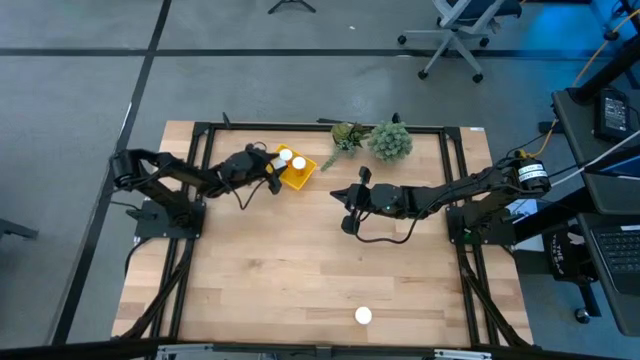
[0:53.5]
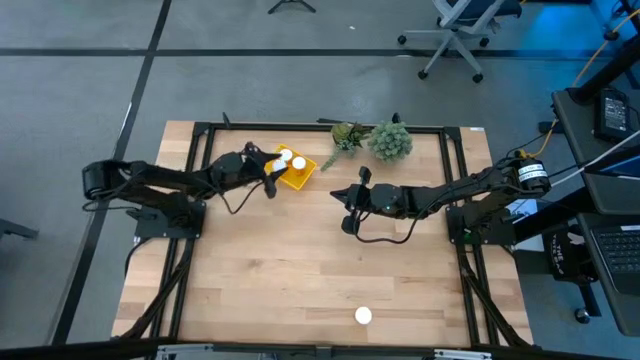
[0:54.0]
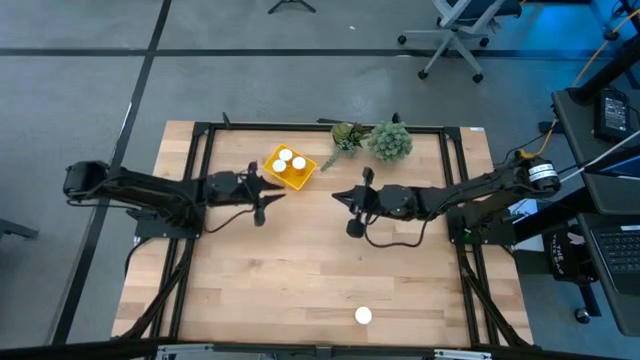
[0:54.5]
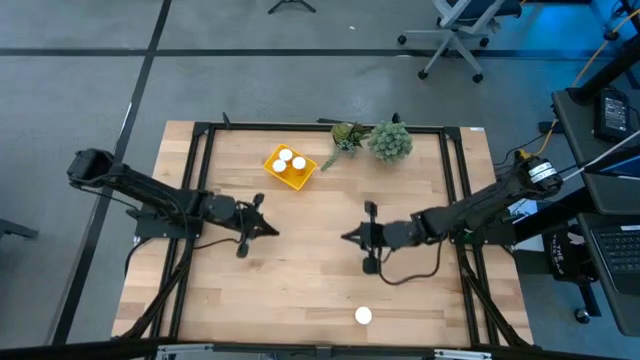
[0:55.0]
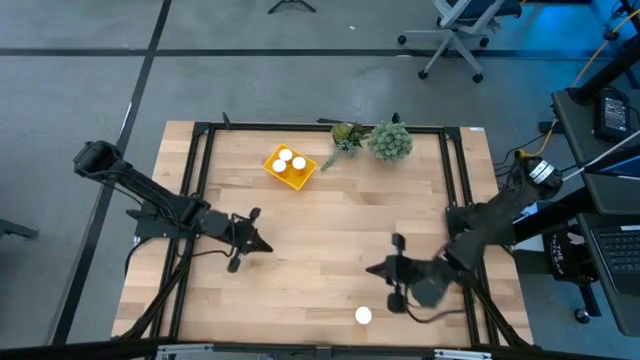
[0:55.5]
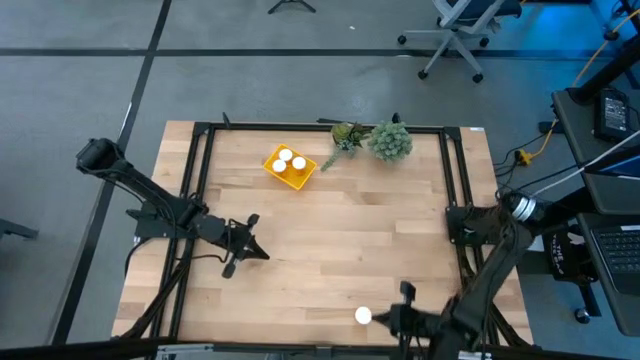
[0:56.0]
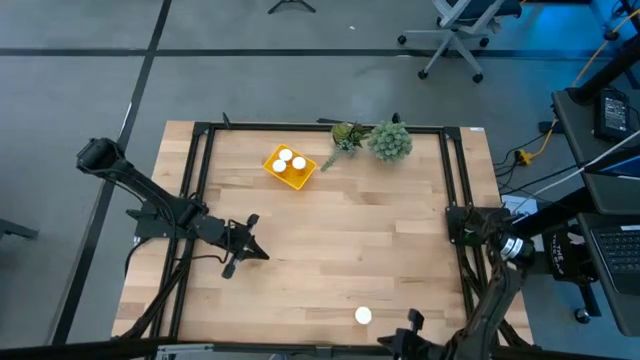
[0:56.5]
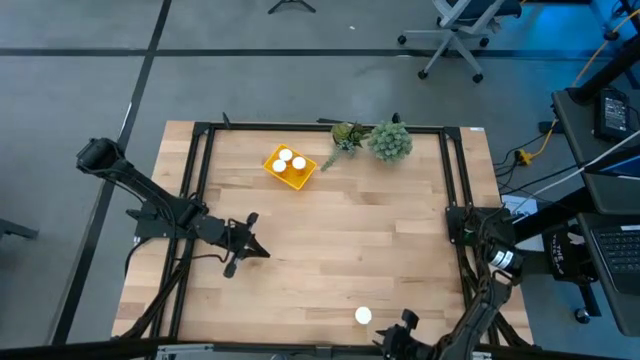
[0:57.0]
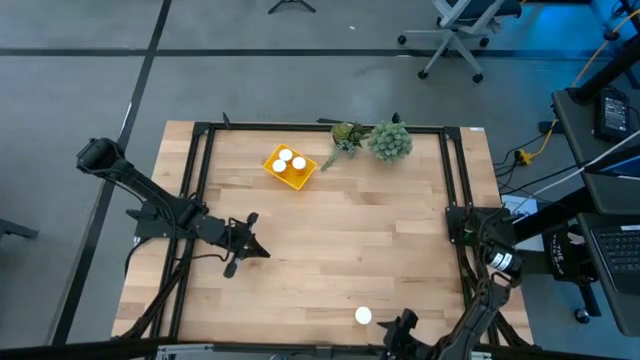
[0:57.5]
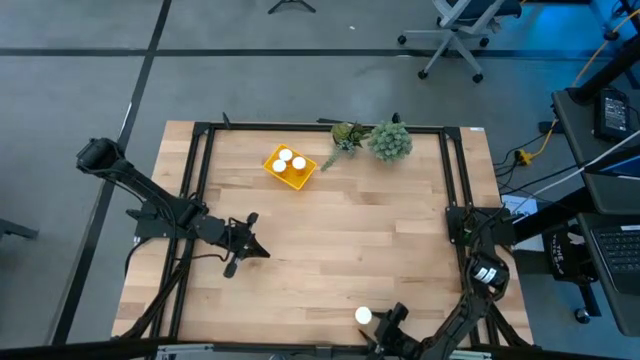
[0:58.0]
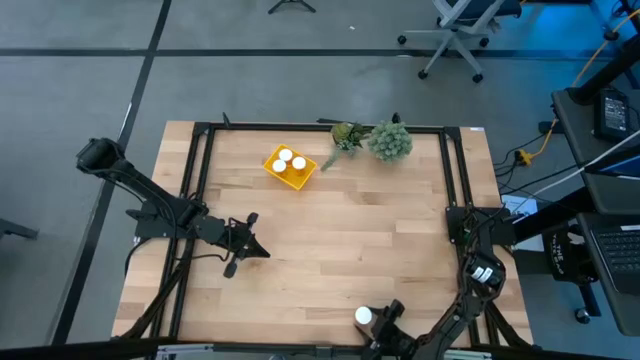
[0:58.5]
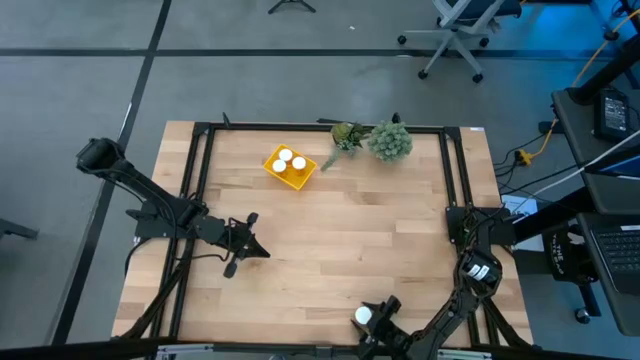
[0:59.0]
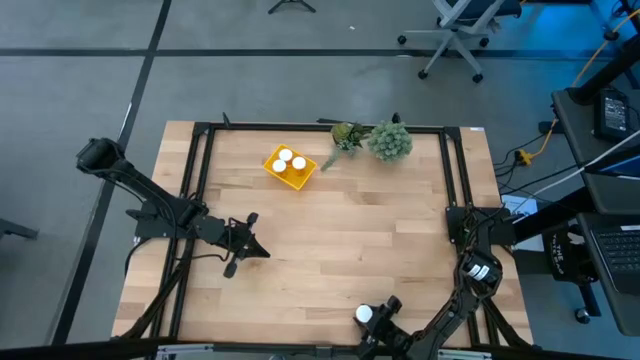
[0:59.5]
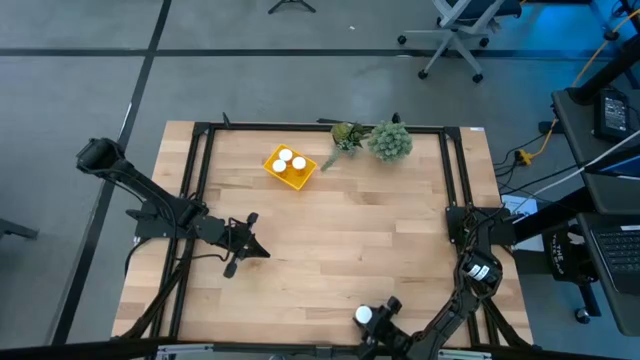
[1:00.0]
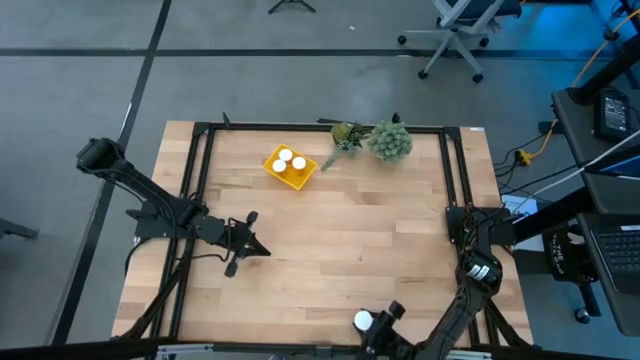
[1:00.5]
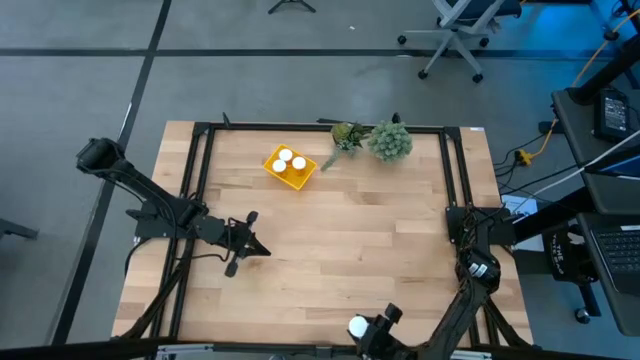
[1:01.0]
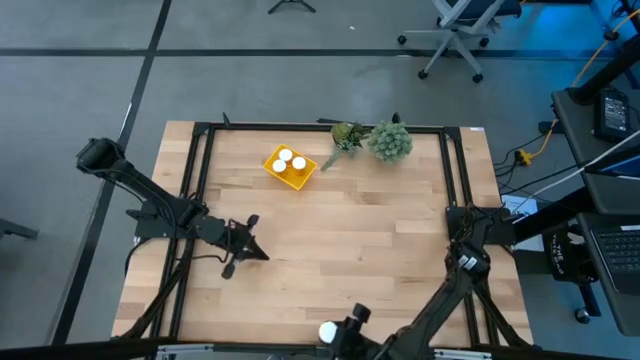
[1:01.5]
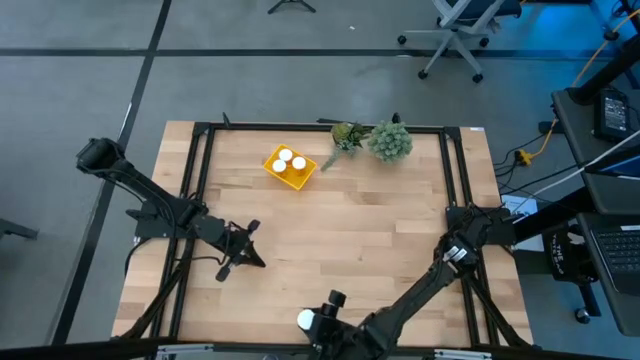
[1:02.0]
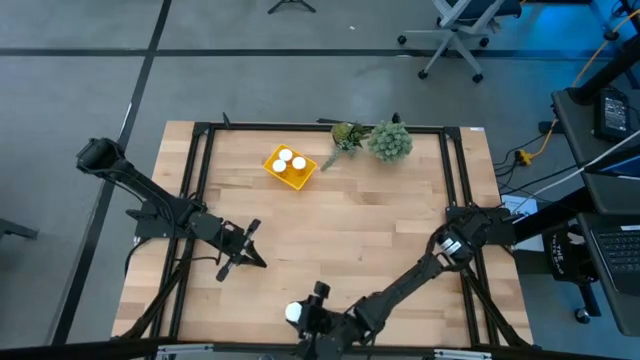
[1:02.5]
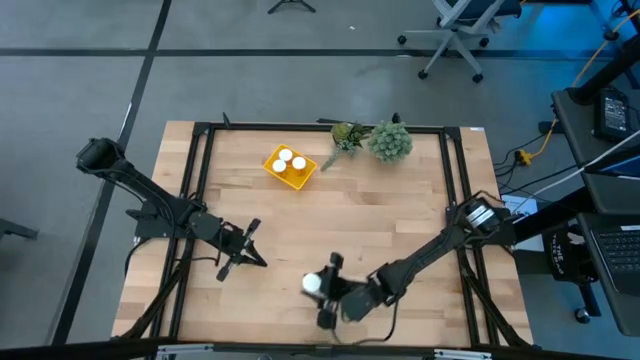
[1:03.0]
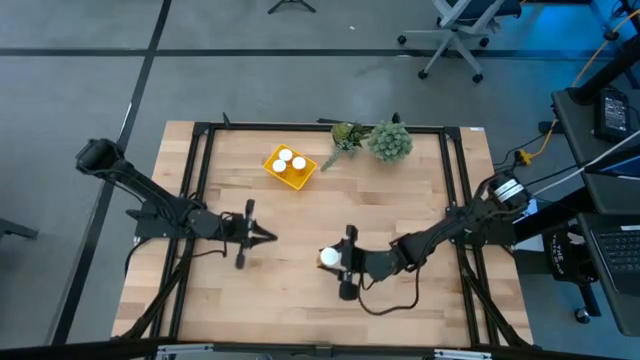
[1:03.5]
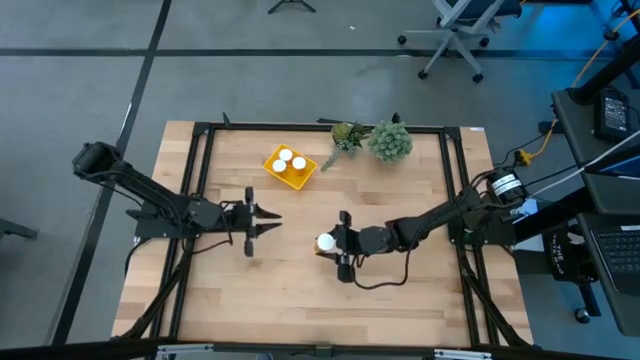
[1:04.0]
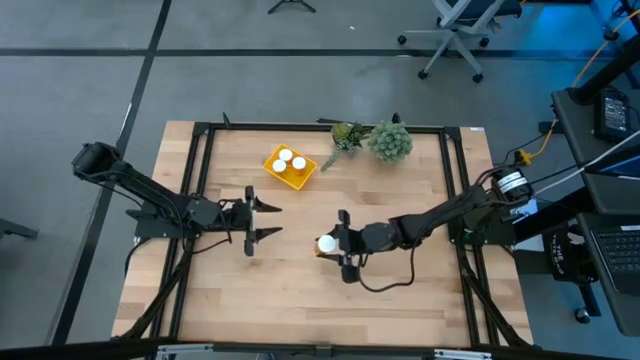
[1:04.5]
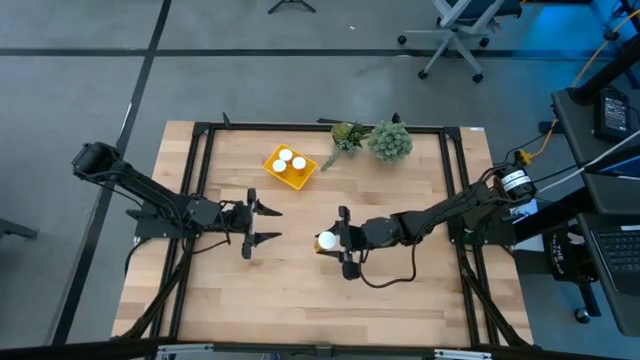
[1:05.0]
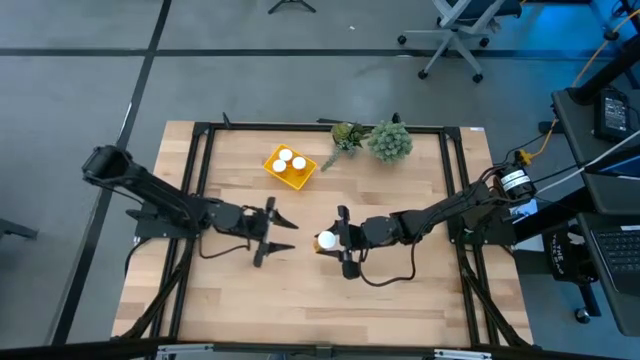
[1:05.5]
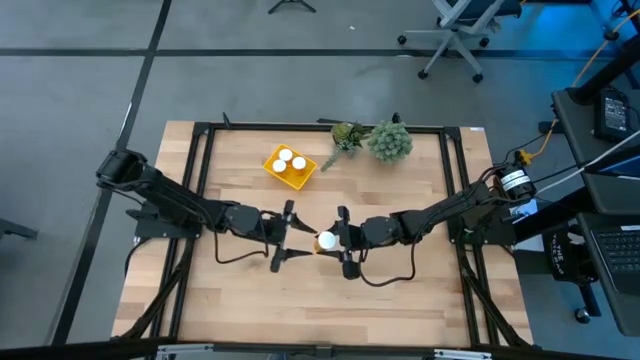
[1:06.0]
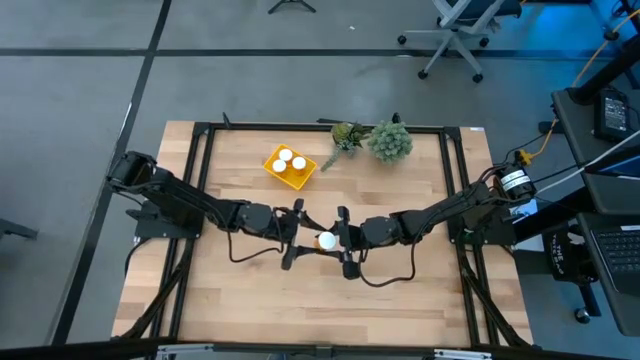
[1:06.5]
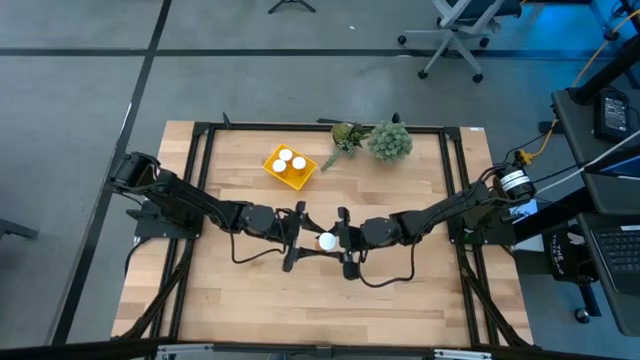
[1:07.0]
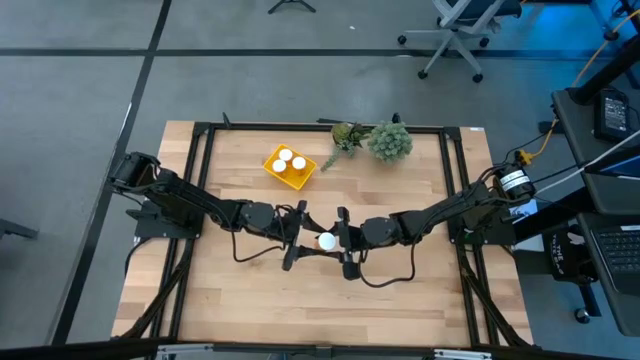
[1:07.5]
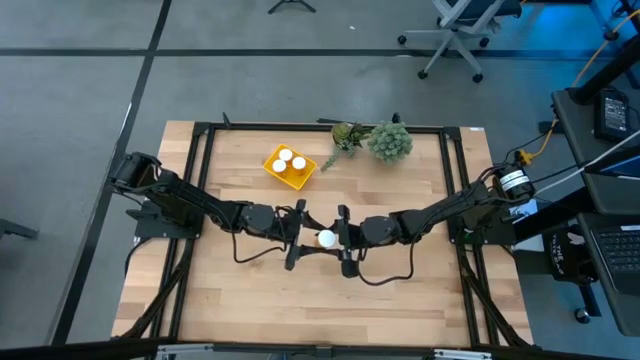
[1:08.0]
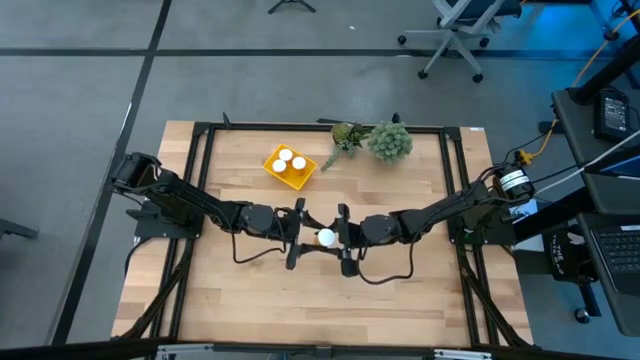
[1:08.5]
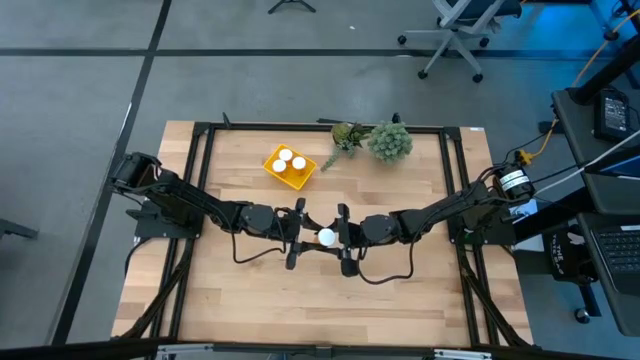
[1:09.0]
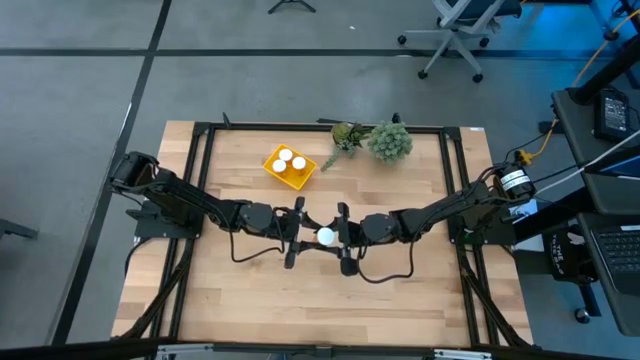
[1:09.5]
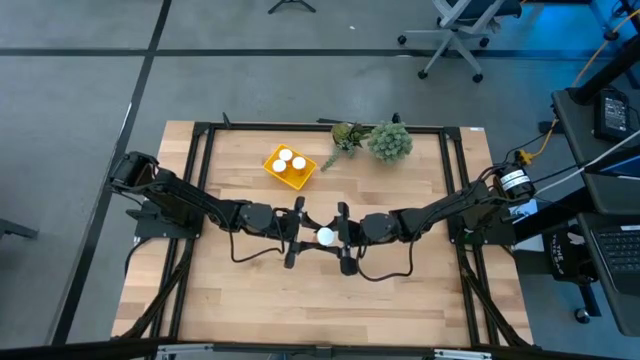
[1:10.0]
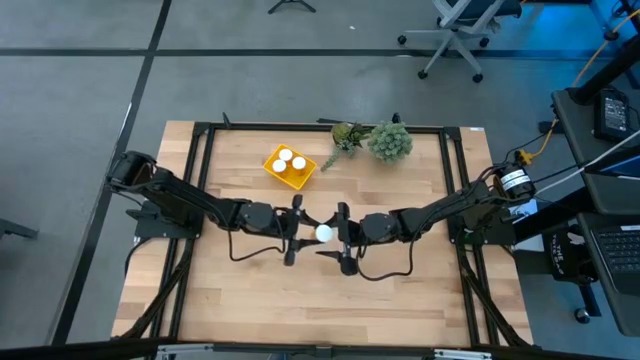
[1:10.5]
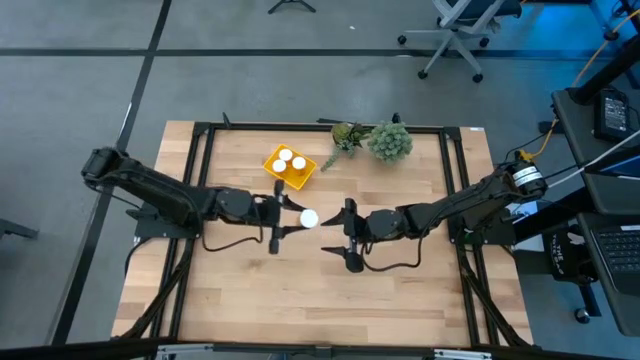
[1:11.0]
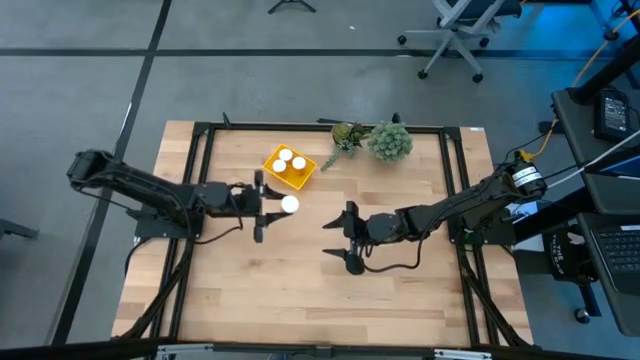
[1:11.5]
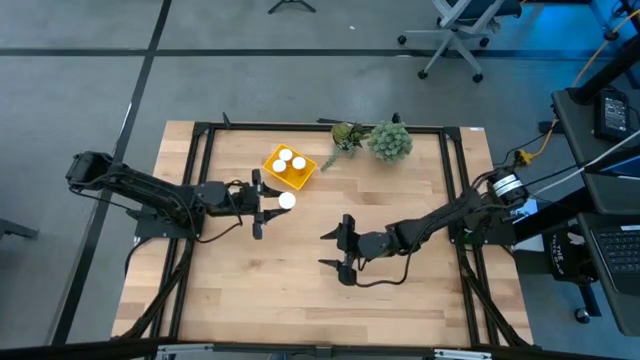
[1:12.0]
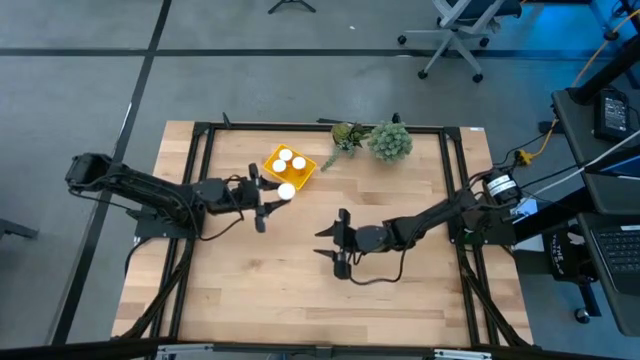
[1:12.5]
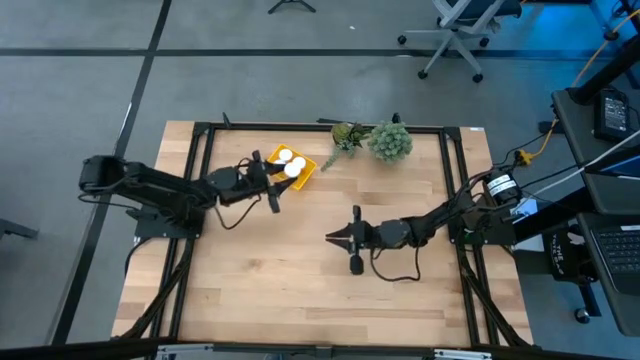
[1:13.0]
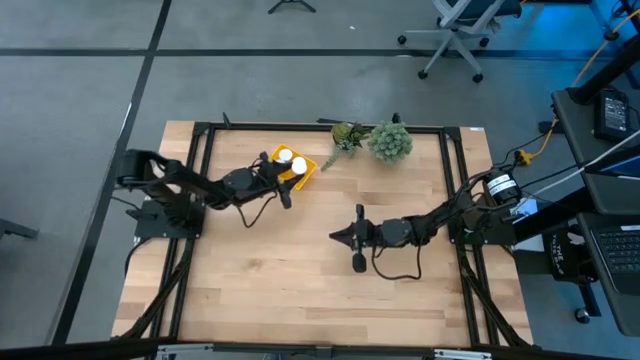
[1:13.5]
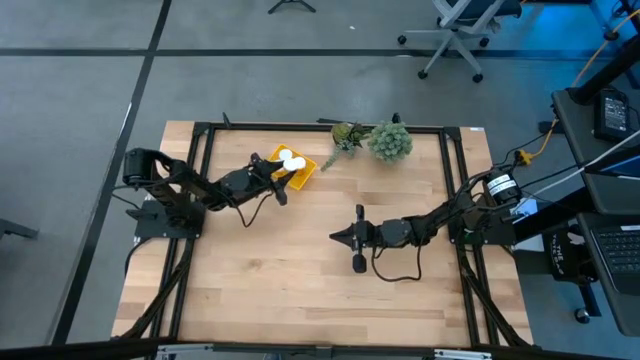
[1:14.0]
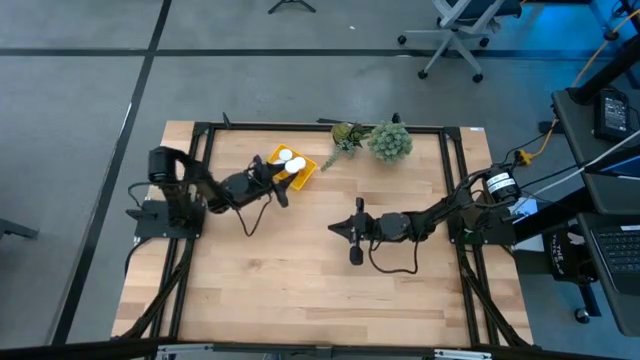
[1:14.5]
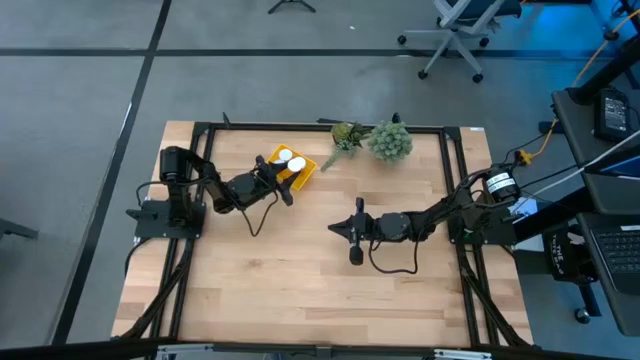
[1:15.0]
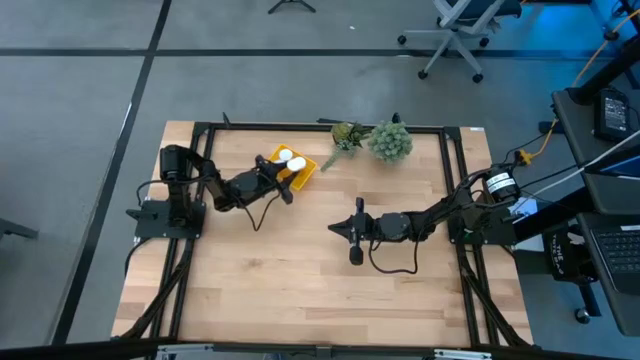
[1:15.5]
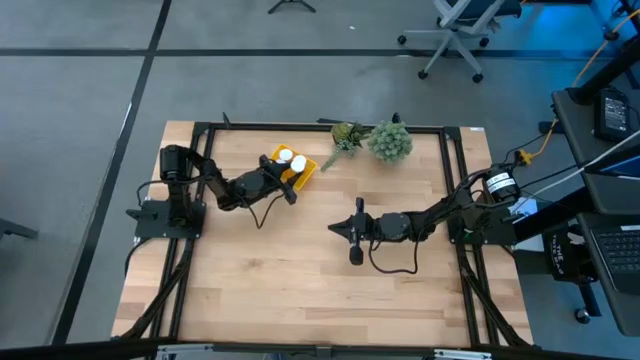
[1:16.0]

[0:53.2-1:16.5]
Task: Pick and place pill bottles into a basket
Put the orange pill bottle into the yellow bin
